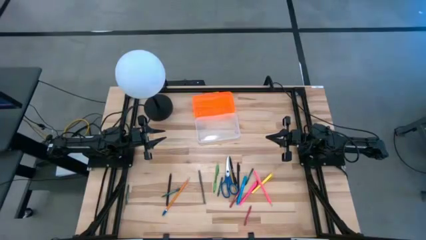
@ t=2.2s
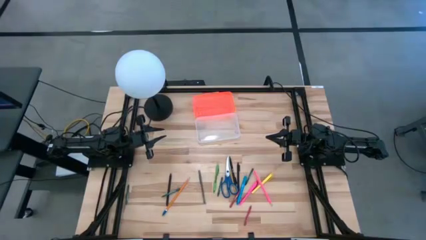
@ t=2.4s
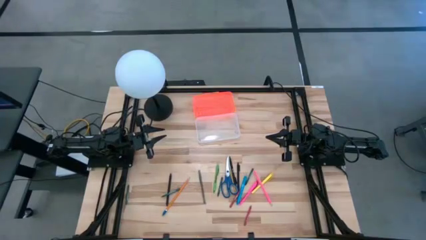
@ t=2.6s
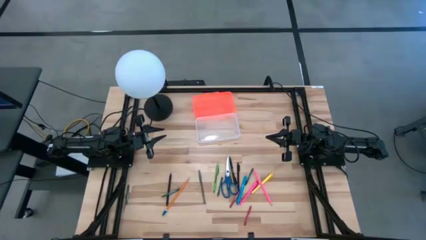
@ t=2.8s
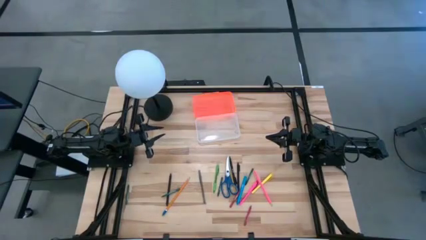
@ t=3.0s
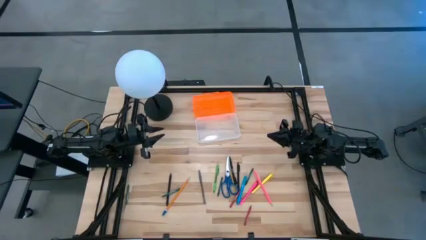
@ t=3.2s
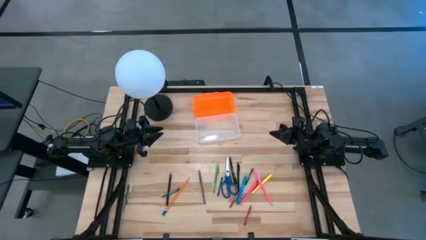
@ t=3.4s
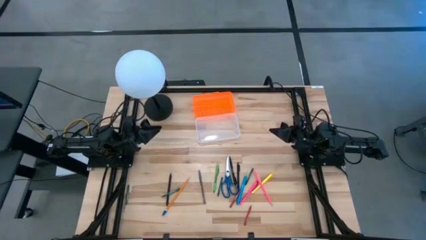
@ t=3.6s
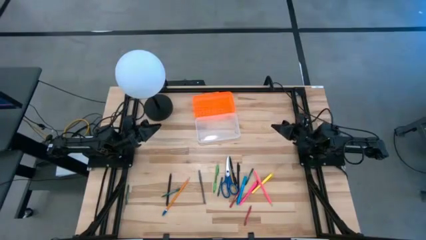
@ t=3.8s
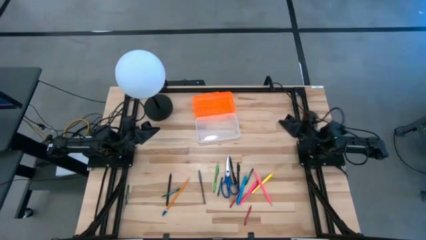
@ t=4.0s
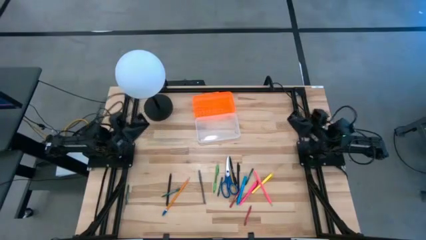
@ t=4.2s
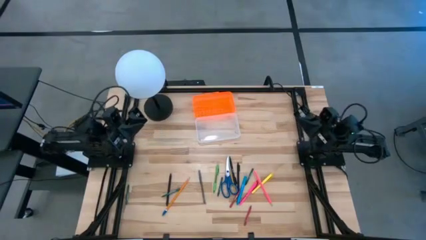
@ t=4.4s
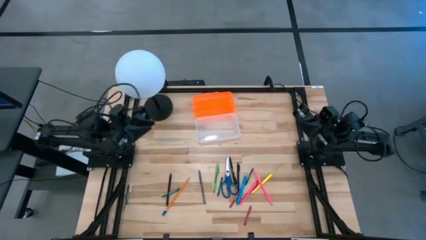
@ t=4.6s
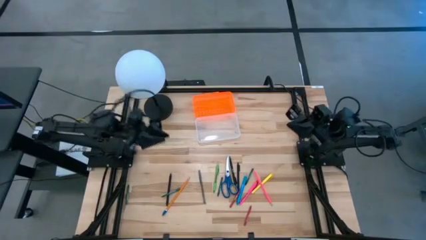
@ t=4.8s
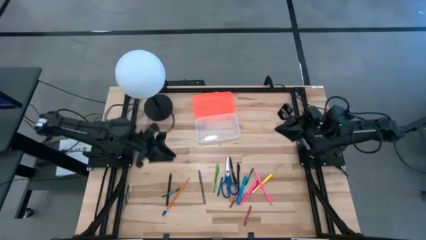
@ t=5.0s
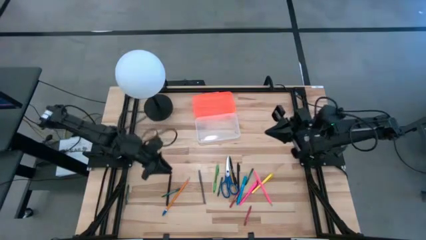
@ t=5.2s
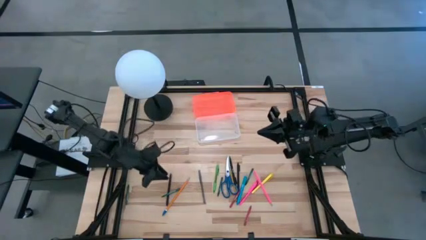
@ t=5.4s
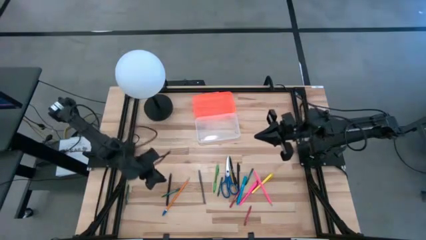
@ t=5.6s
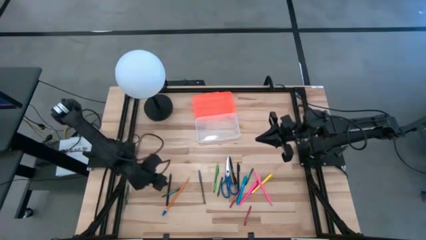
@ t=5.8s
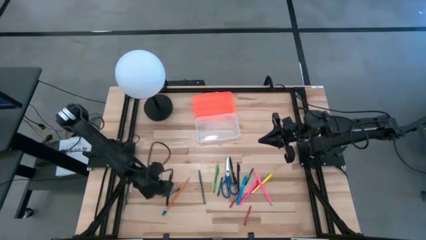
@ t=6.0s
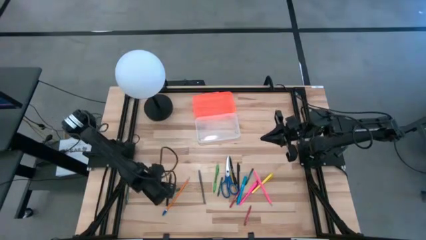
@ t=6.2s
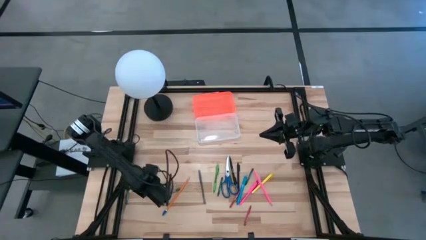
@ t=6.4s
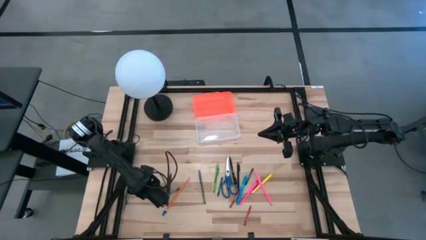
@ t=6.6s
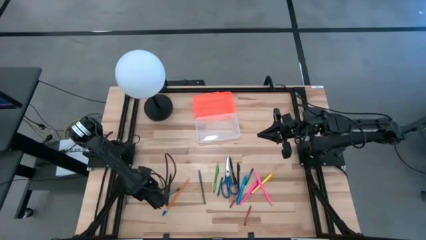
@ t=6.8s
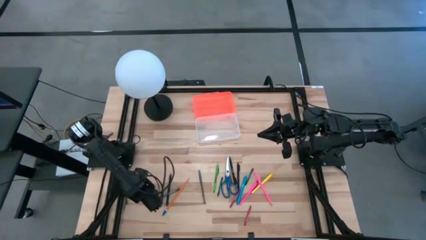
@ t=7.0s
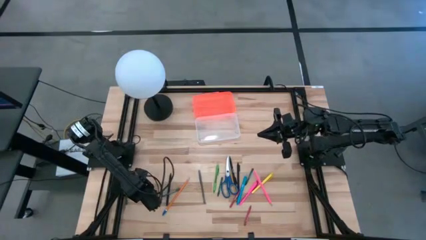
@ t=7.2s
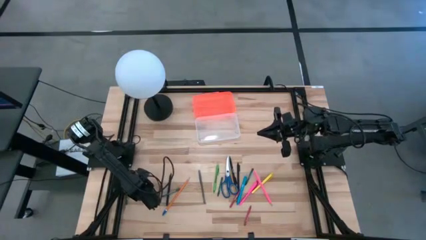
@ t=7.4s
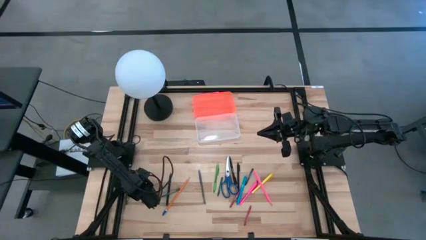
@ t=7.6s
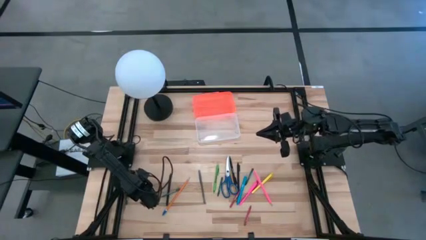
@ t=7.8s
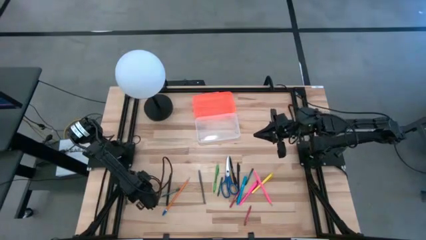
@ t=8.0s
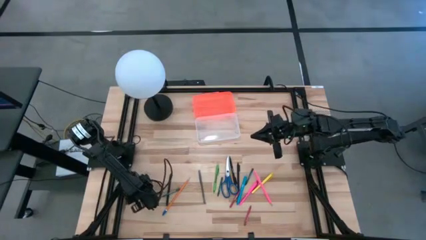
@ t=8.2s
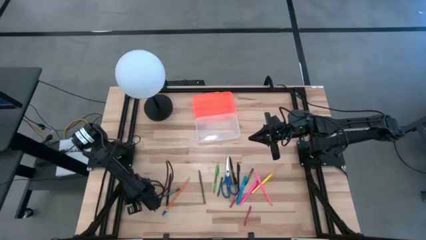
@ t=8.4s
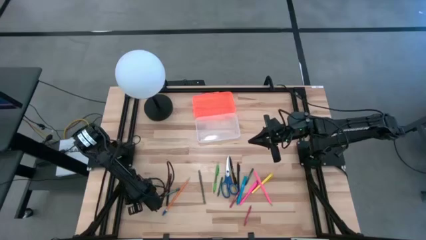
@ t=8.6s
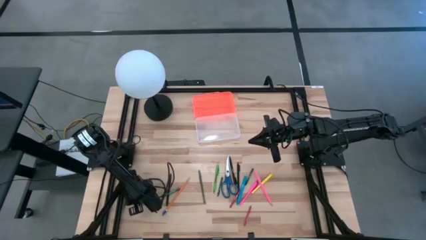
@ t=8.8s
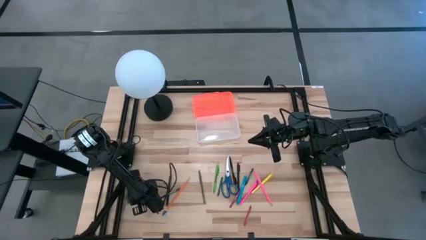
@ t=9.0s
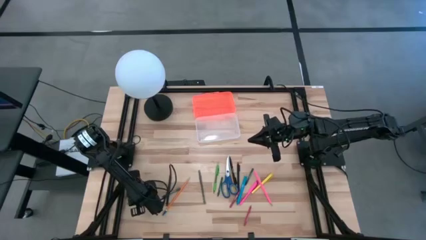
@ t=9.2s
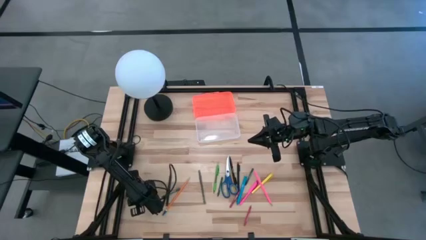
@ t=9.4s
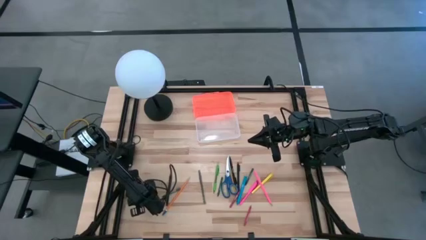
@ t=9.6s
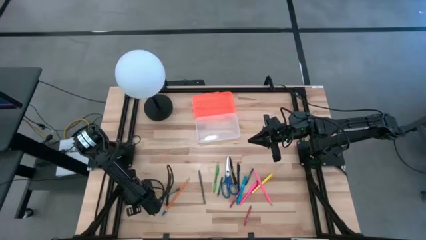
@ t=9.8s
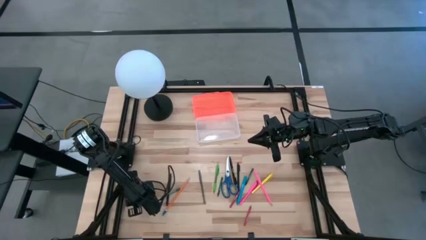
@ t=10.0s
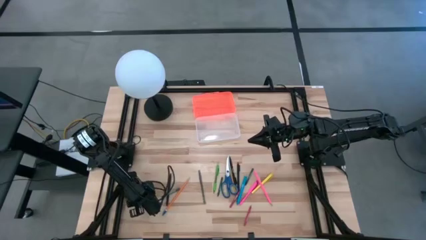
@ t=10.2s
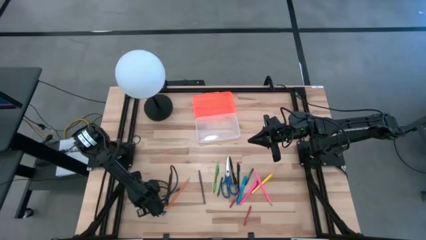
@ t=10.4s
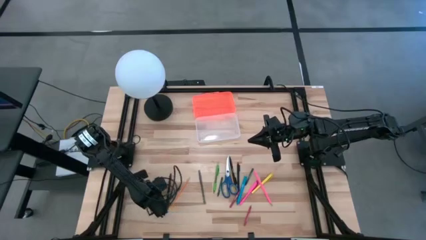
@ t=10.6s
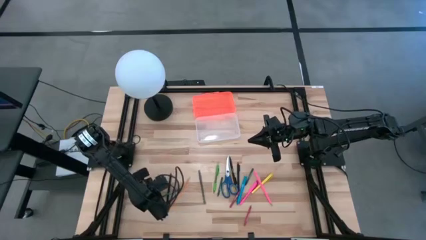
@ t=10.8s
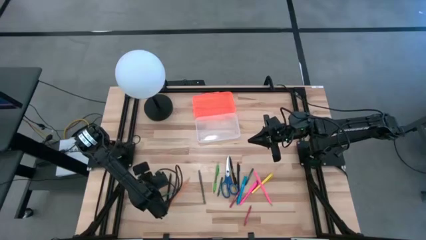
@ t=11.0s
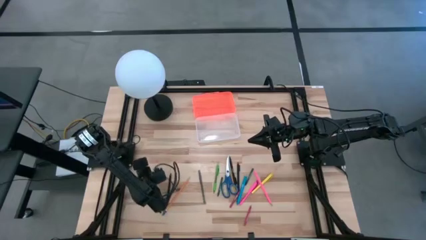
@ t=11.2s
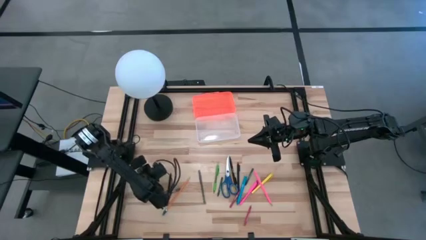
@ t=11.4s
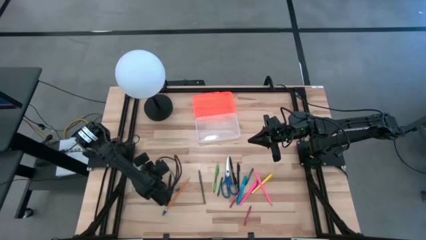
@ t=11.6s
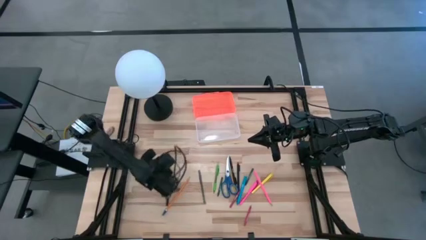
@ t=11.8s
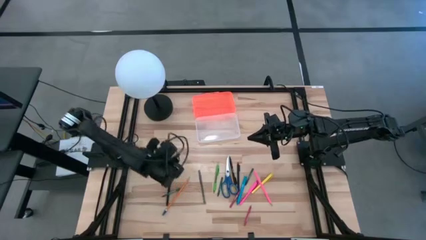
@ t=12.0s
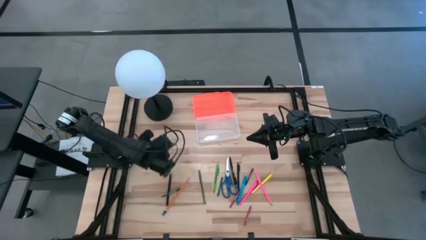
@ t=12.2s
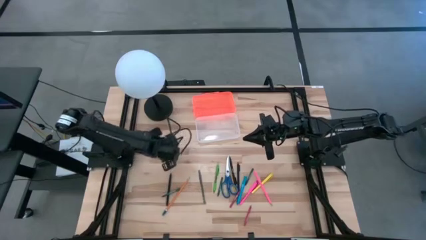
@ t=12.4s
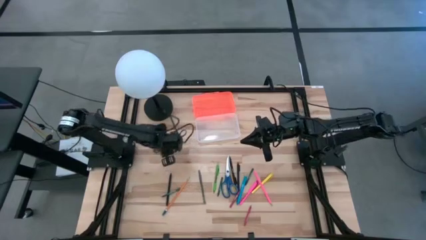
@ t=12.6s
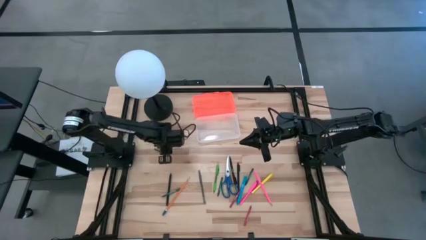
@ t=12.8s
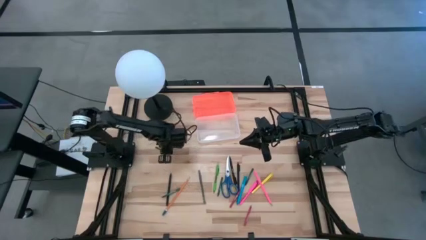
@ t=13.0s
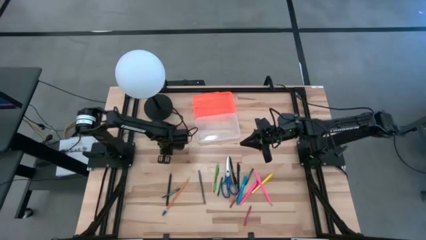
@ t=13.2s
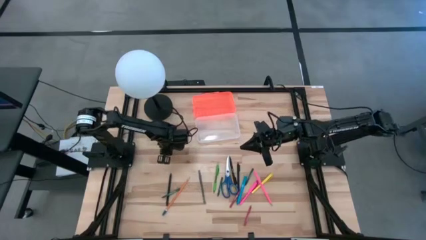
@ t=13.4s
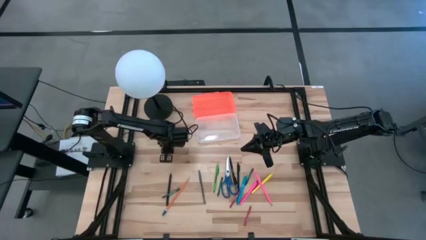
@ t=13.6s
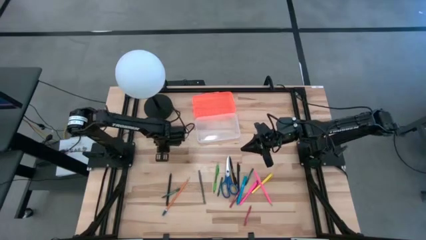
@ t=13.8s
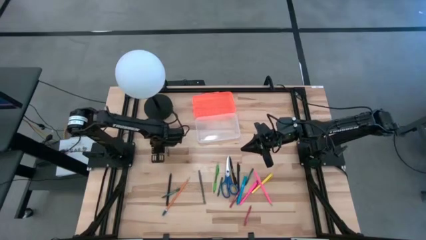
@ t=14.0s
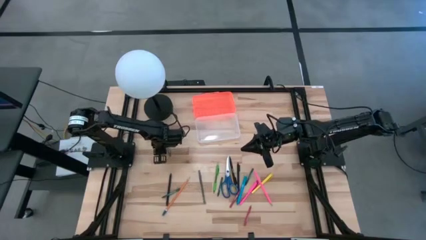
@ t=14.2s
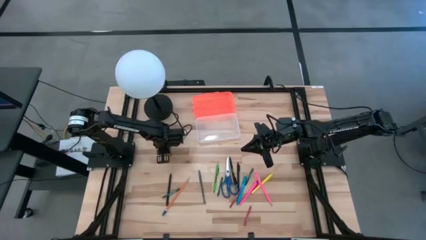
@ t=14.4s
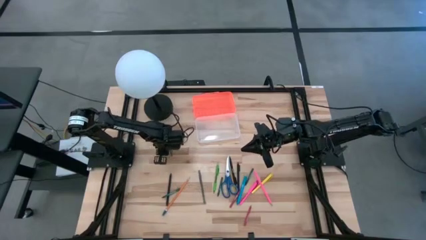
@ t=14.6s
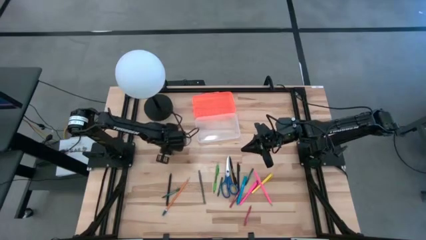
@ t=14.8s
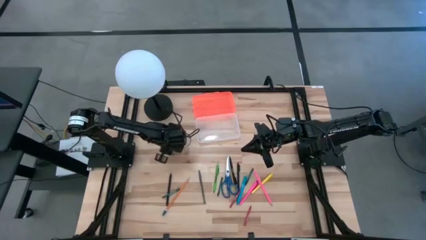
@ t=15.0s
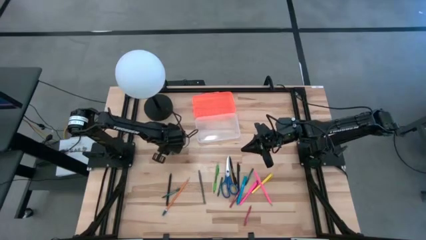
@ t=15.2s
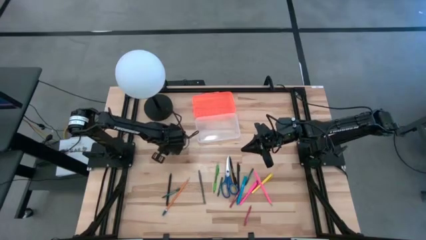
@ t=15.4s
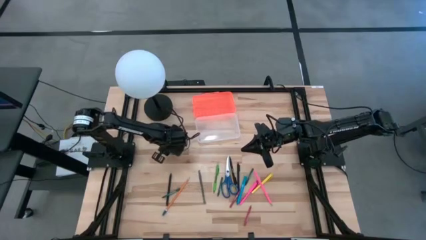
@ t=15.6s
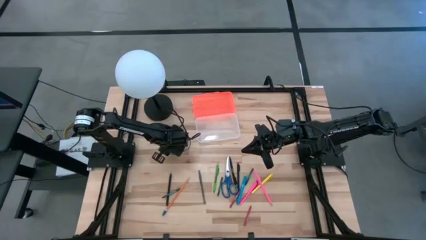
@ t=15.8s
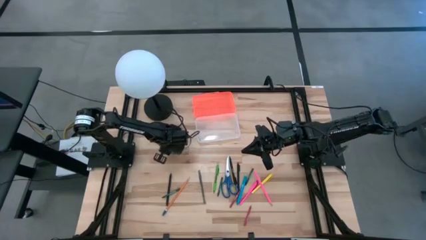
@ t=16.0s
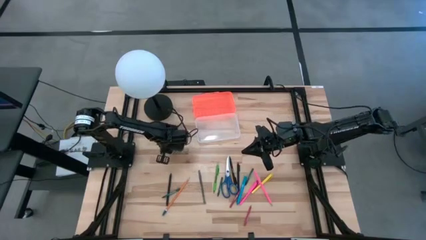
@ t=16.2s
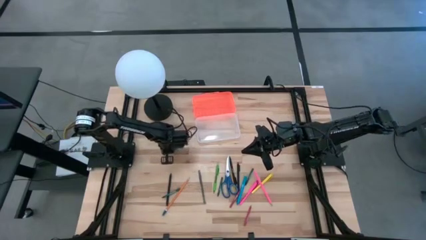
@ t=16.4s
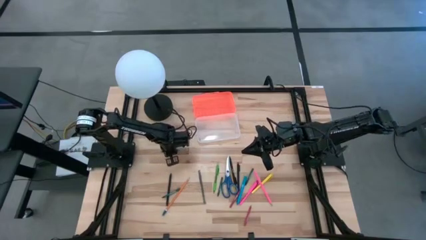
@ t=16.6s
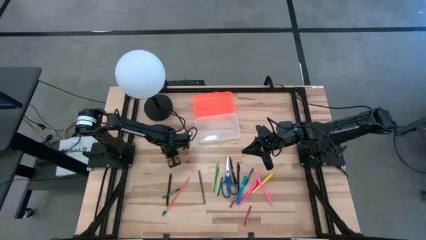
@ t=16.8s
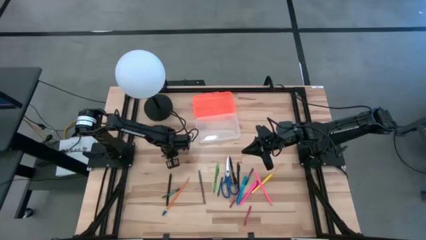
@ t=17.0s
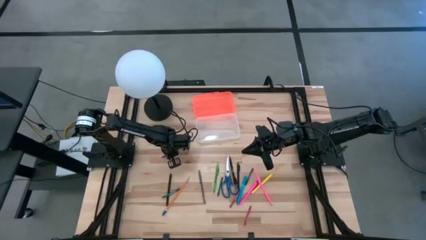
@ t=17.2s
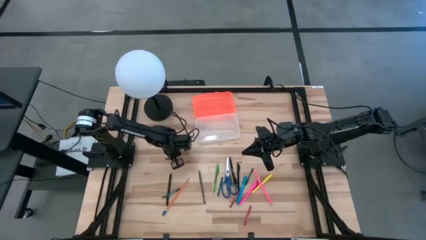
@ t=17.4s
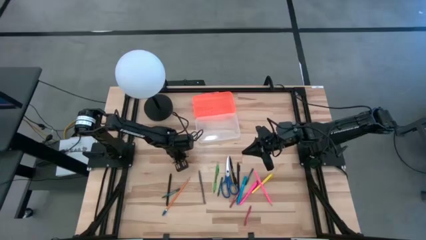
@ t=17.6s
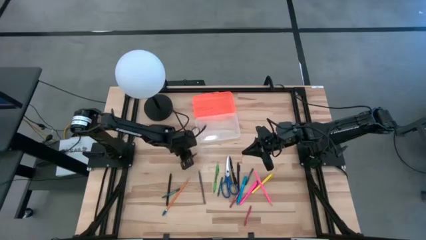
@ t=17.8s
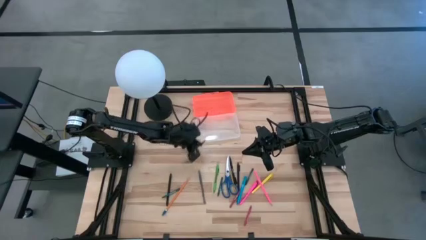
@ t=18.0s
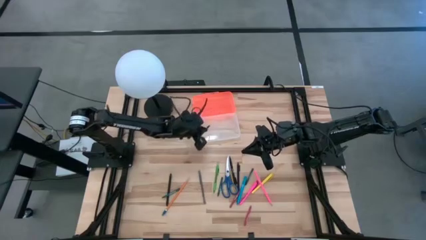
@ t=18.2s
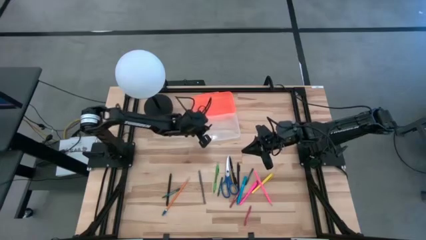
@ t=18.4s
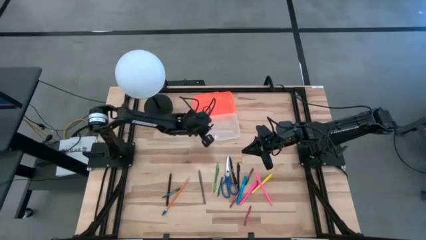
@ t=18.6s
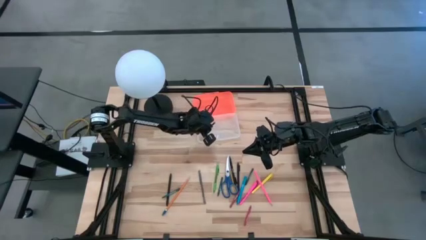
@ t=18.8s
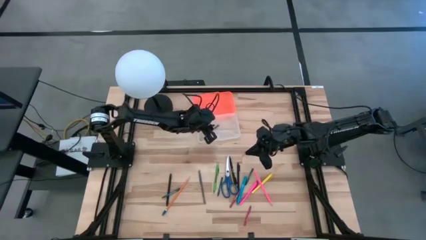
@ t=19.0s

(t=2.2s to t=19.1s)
Task: Pick & place school supplies into a supply box
Put the green crayon into the supply box
